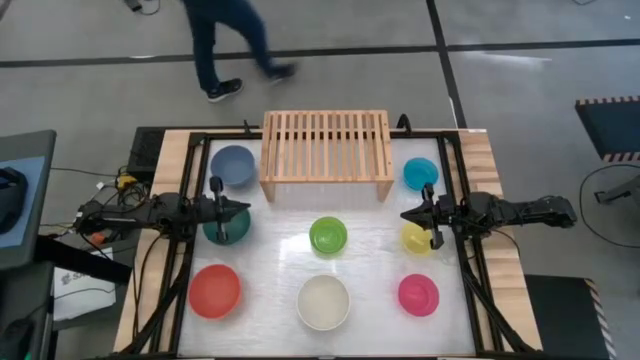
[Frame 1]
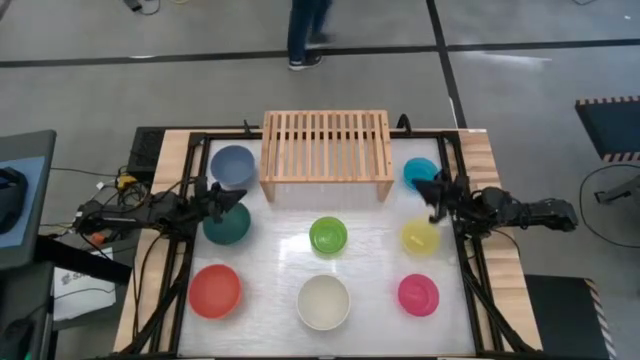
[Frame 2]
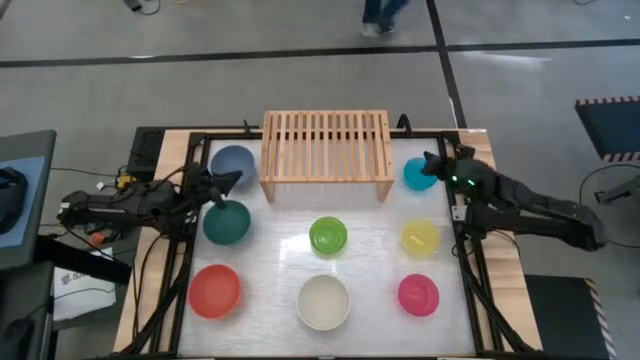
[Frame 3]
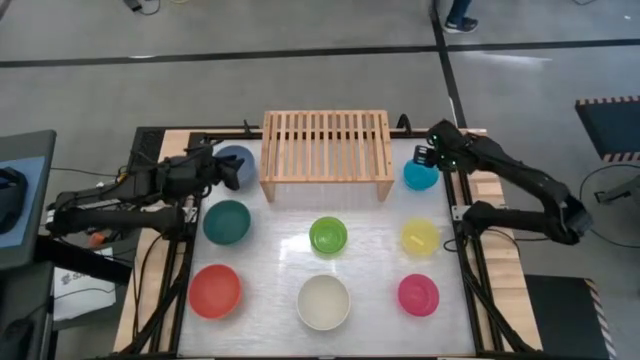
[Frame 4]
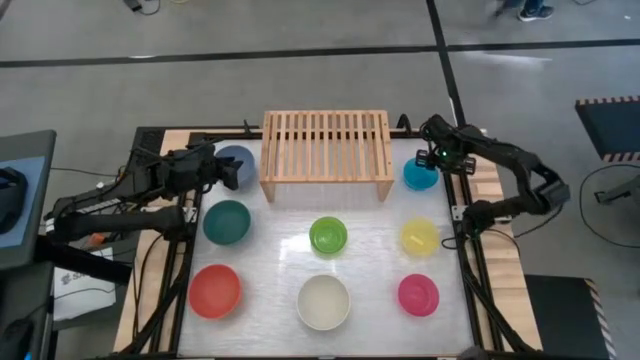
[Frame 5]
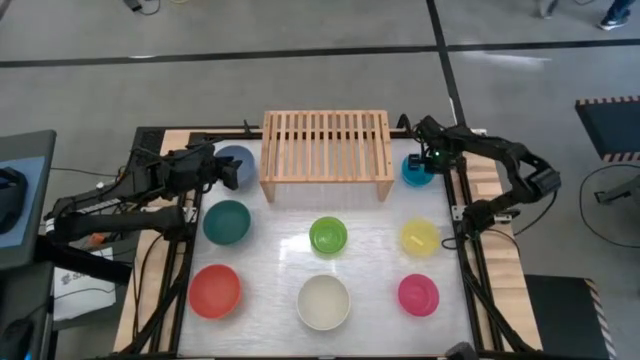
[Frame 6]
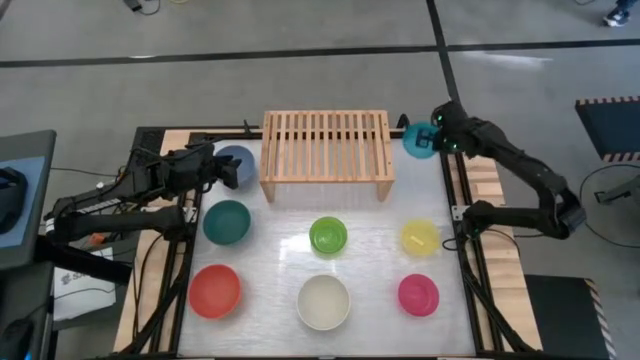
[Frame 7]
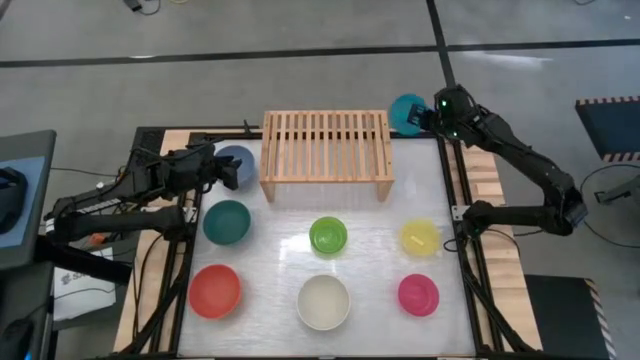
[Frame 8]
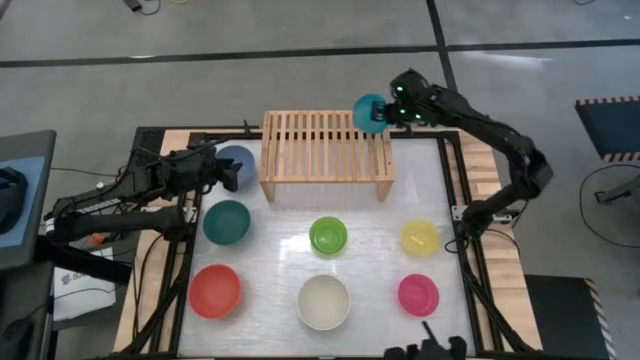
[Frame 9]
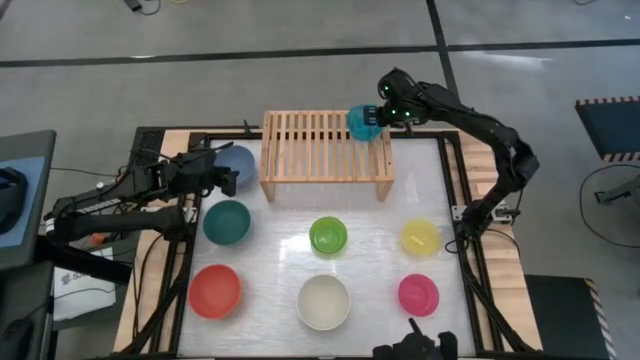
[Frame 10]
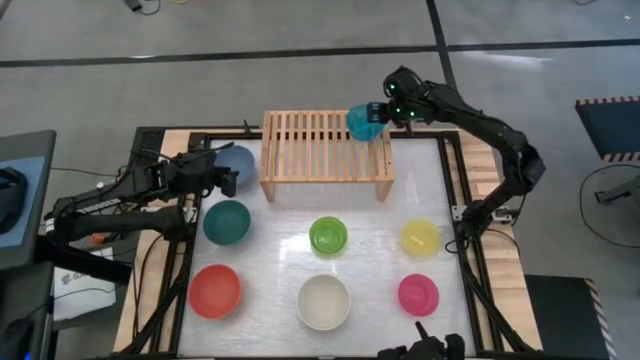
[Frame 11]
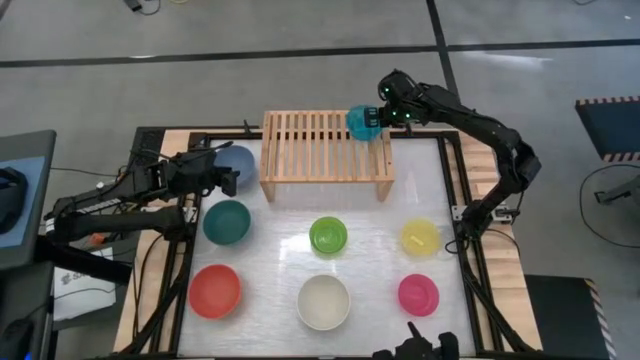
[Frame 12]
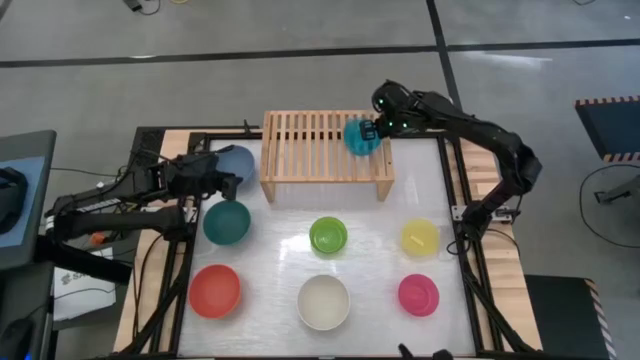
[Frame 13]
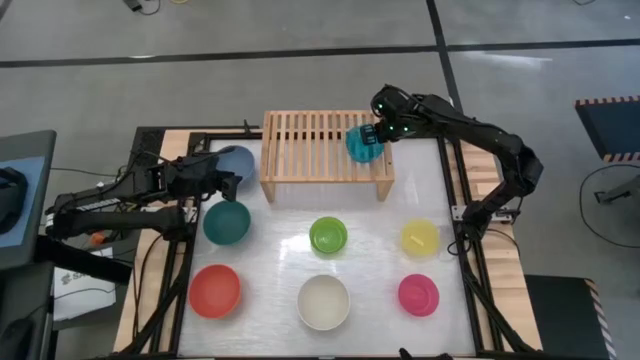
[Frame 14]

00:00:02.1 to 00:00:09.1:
Task: Place and stack bowls onto a shelf
Put the small blue bowl on the shelf

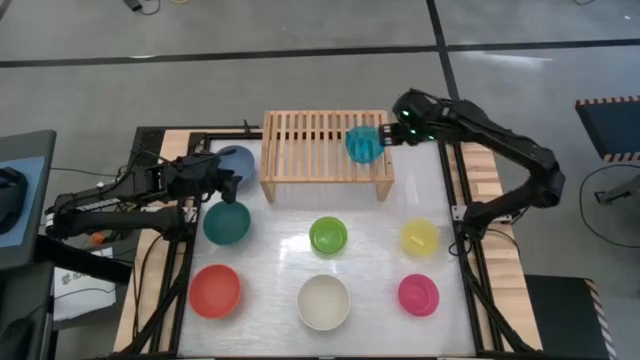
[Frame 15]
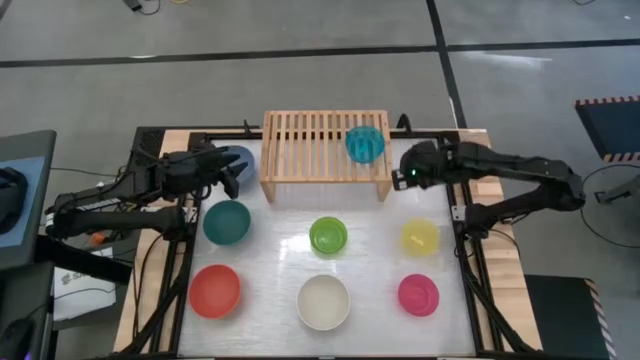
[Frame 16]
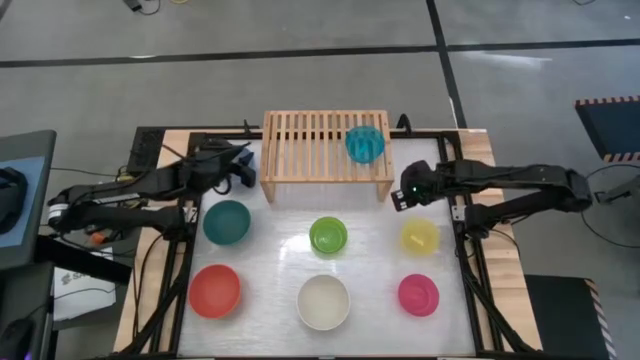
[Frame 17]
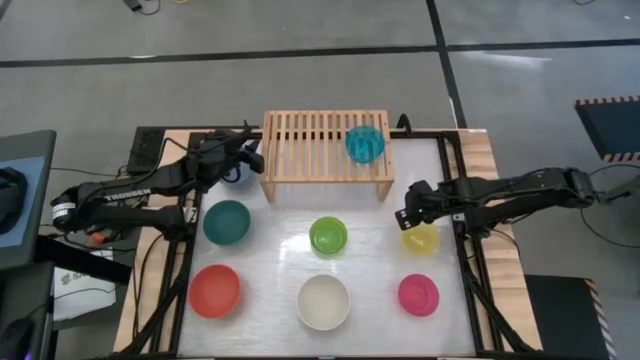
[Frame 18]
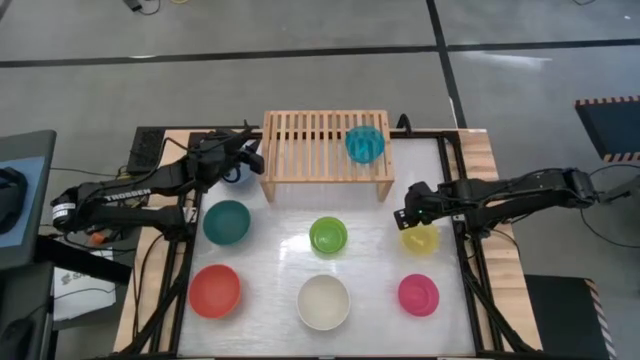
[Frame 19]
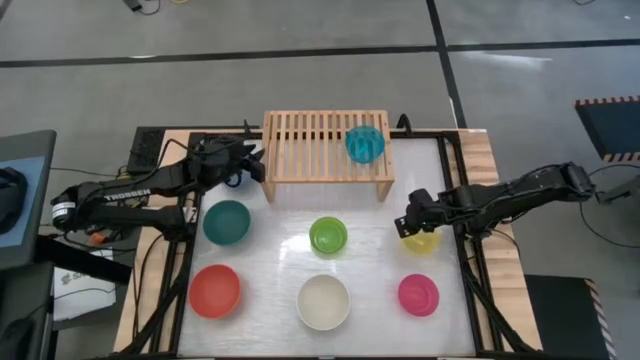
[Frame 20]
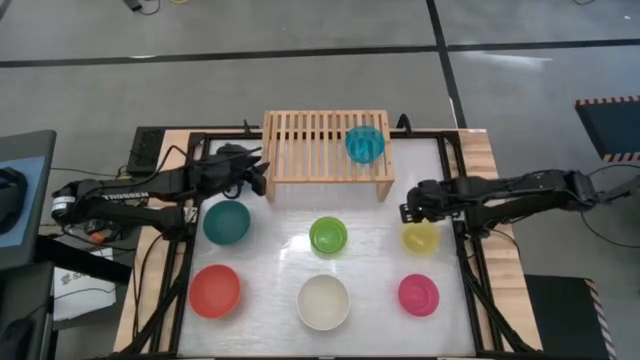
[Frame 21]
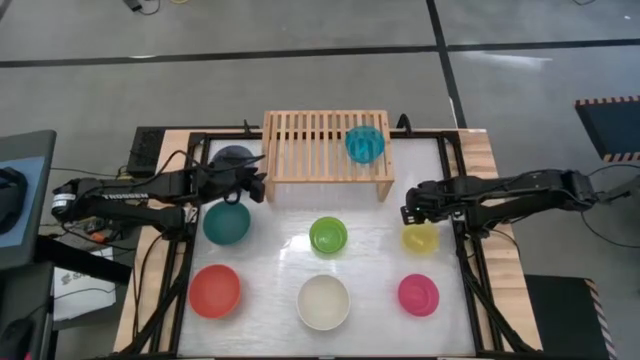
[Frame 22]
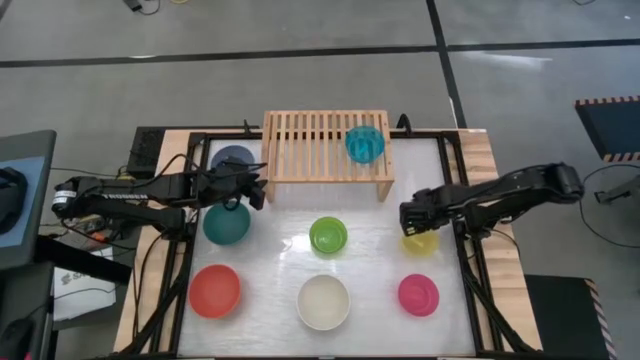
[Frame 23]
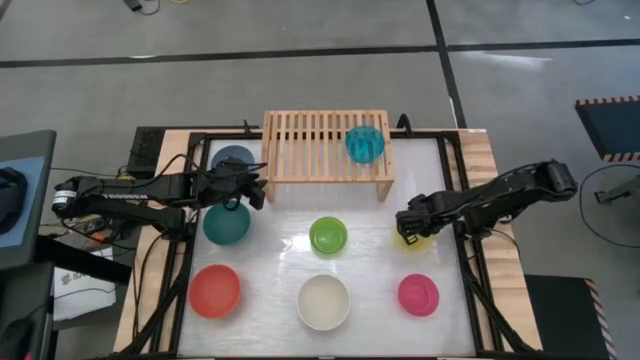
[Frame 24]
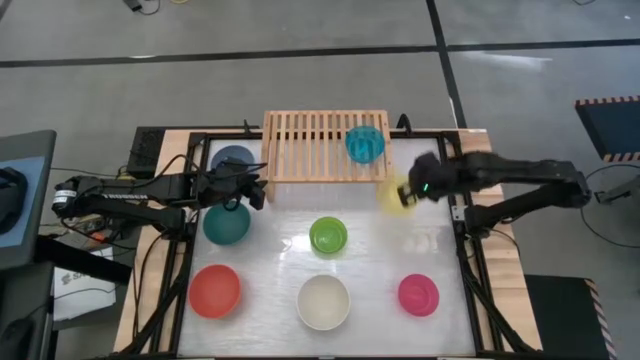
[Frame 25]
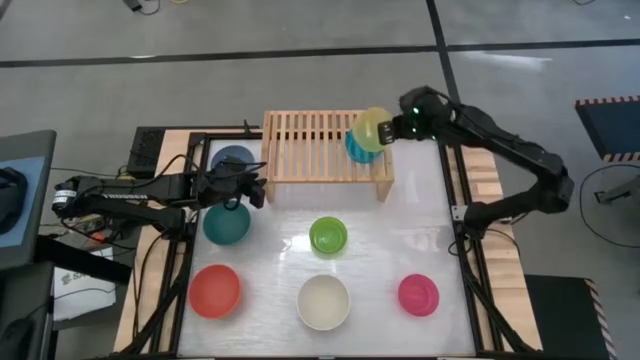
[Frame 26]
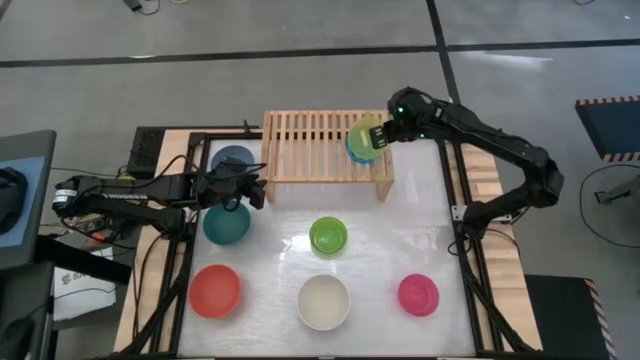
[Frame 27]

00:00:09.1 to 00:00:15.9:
Stack the small yellow bowl on top of the small blue bowl on the shelf

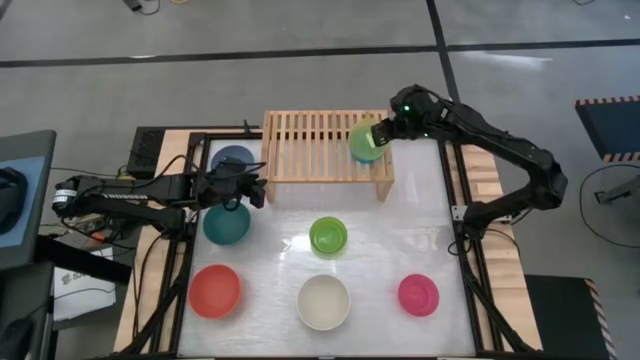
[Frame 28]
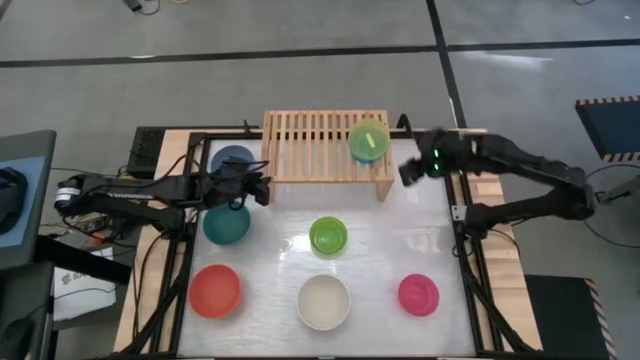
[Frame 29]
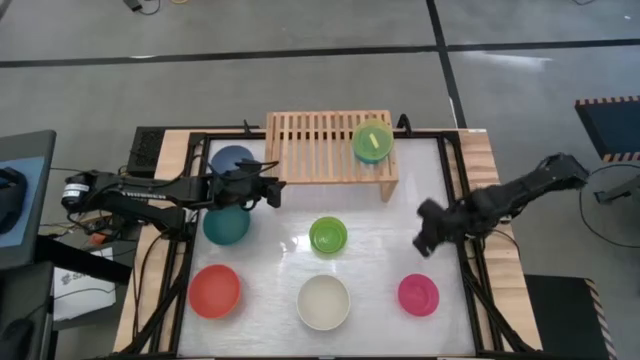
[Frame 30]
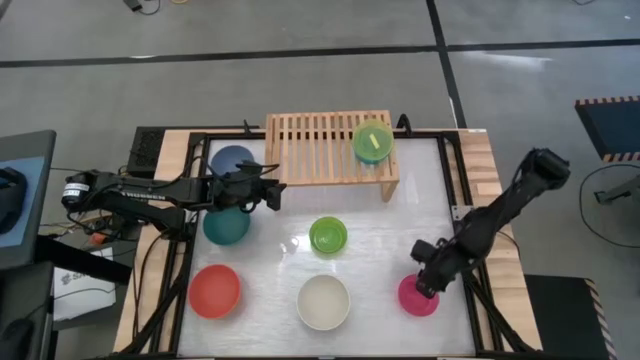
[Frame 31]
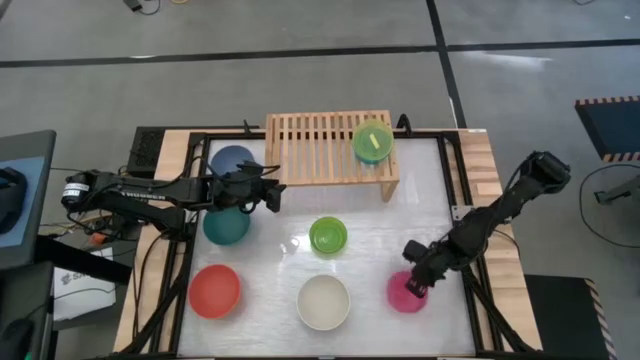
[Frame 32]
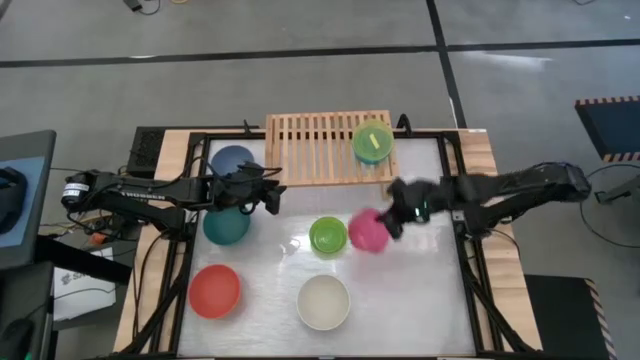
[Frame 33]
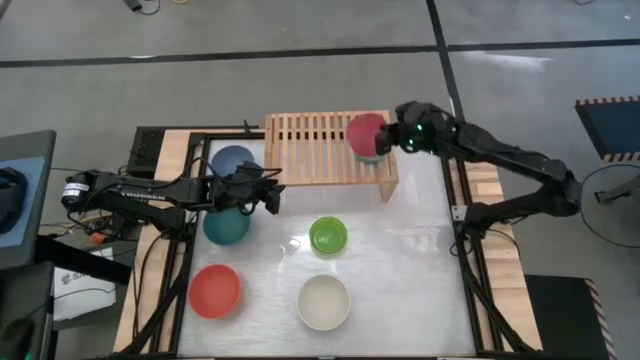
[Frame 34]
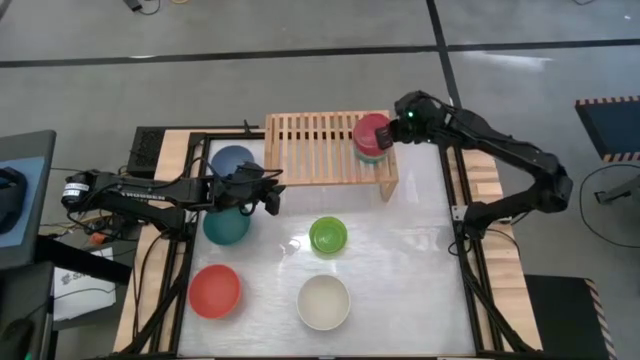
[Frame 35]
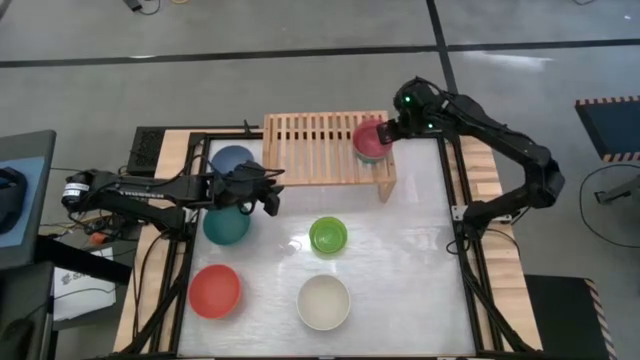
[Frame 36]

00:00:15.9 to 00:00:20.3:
Stack the small pink bowl on top of the small yellow bowl on the shelf

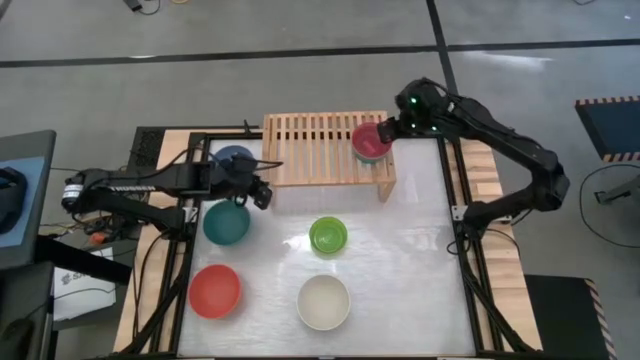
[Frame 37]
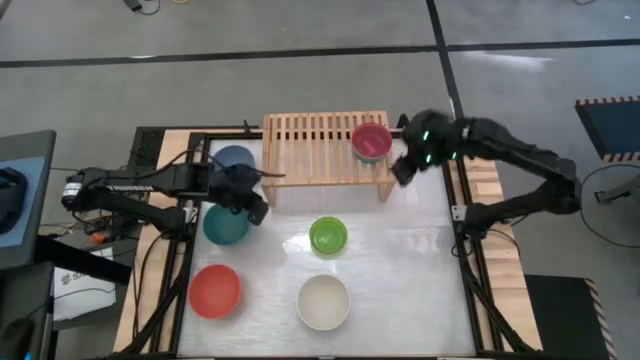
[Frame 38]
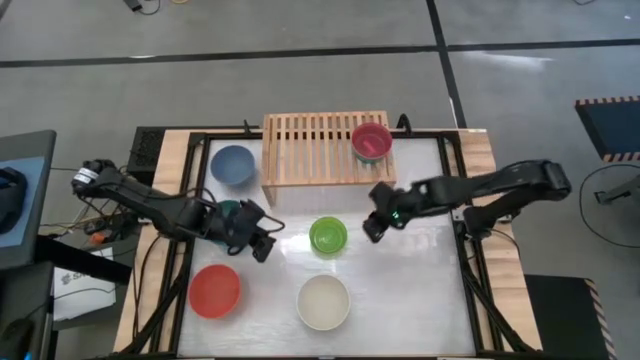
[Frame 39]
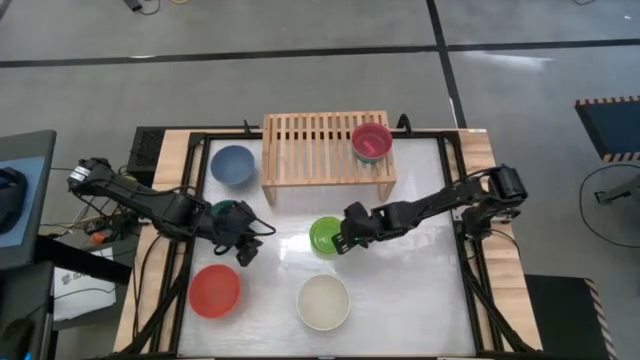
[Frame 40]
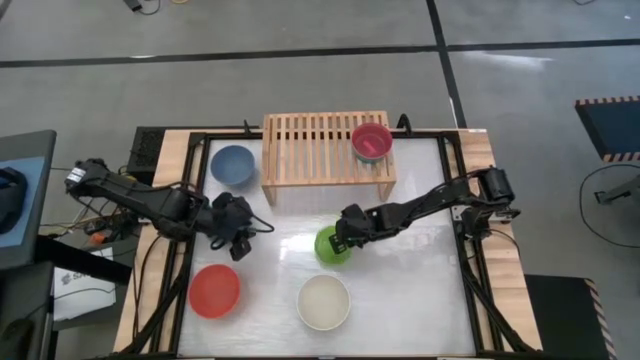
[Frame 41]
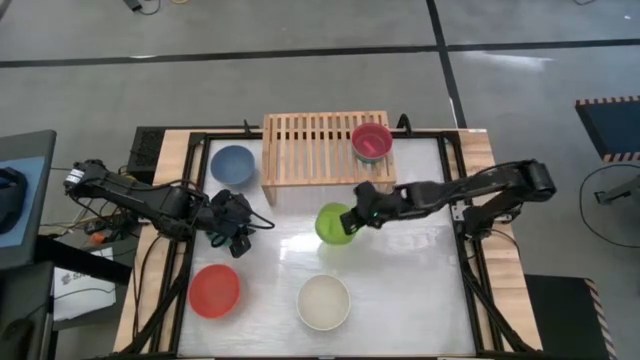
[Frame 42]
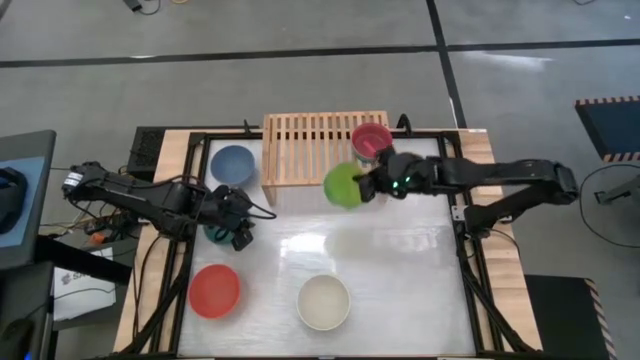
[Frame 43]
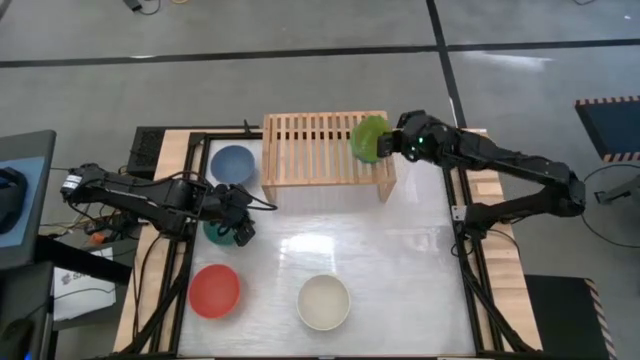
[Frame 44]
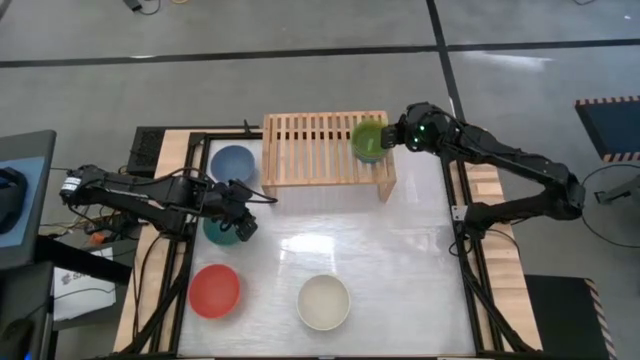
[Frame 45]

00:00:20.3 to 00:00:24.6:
Stack the small green bowl on top of the small pink bowl on the shelf
